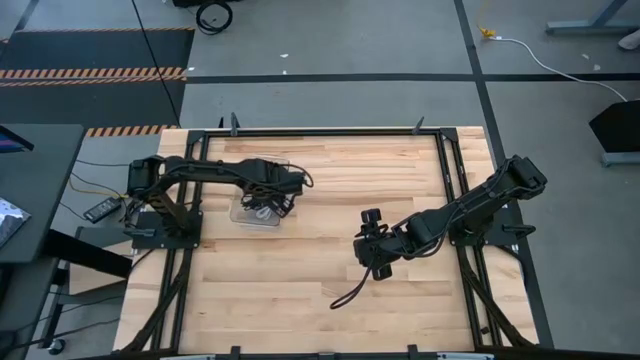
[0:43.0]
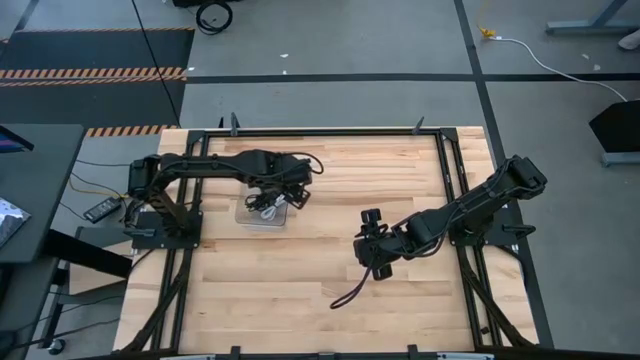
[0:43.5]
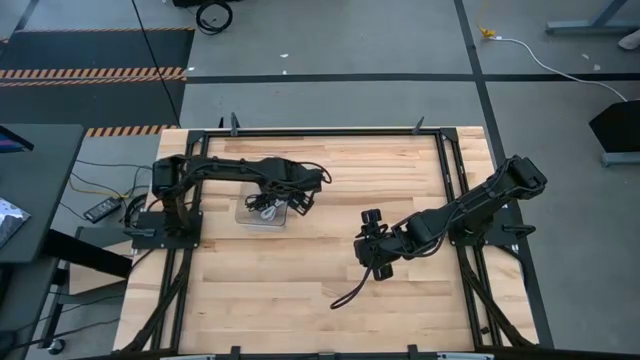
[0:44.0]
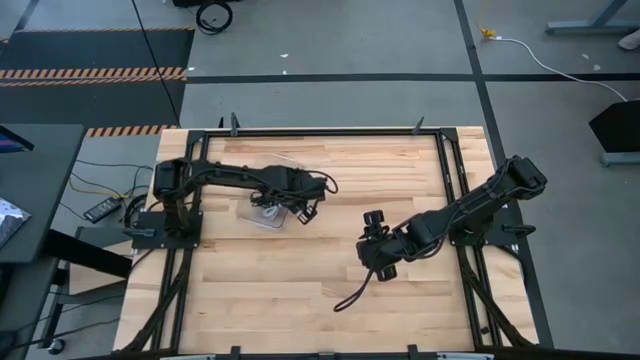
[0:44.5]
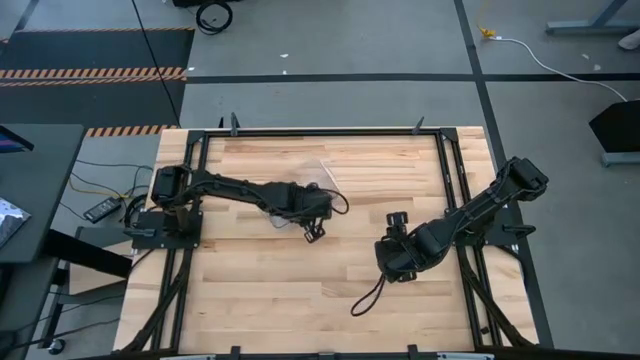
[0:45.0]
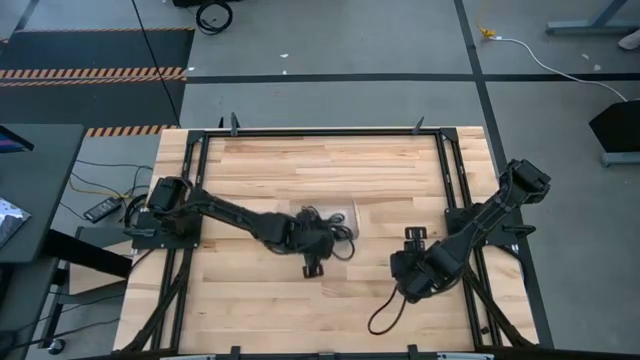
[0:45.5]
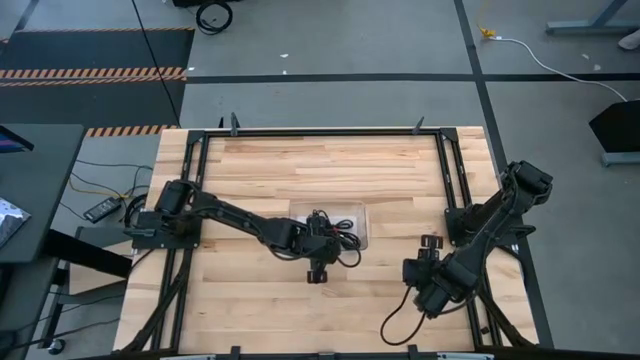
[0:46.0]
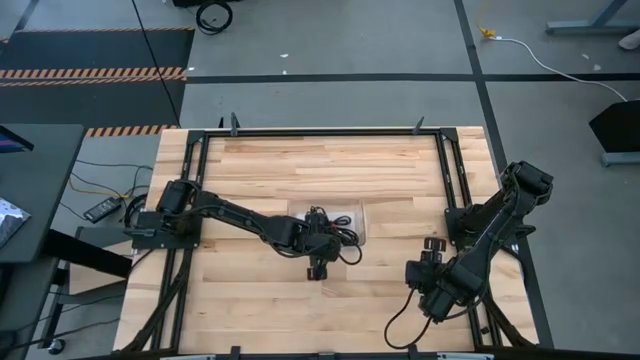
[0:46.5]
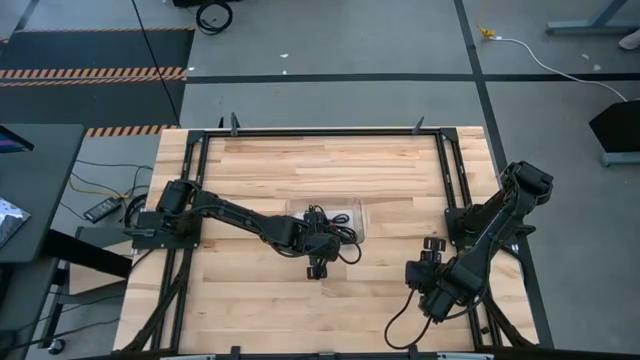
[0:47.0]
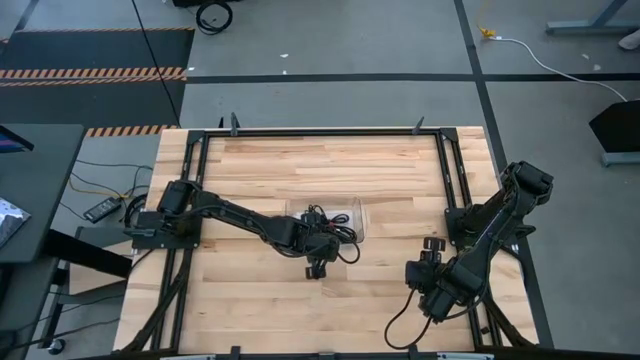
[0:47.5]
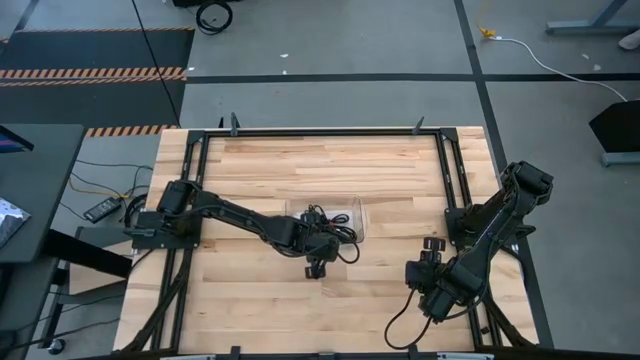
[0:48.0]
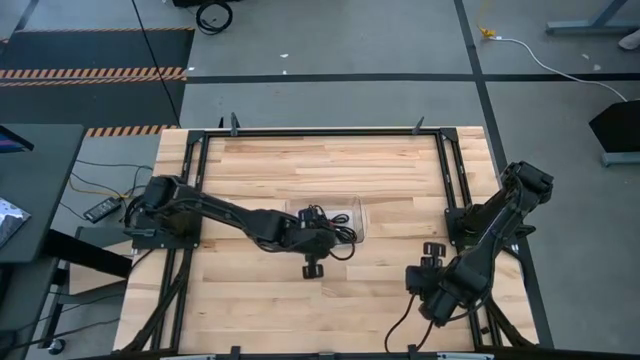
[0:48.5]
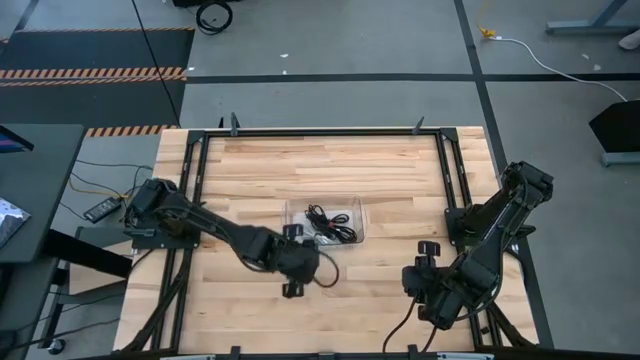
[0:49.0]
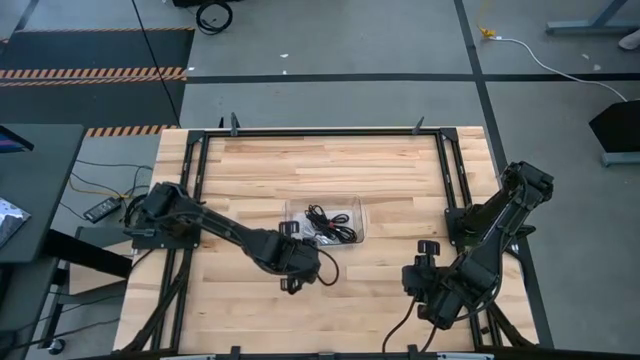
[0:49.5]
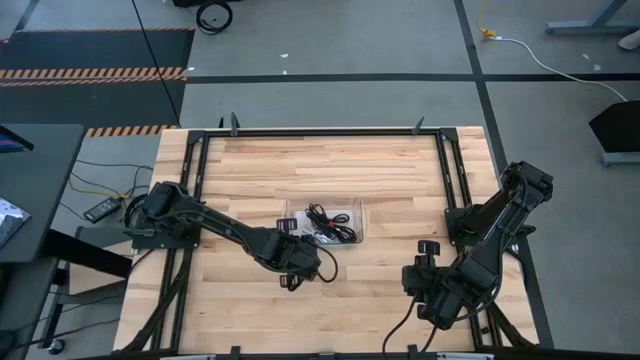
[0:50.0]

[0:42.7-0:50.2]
Task: Pick and place USB-C Cables
Move the transparent bin to the center of the table

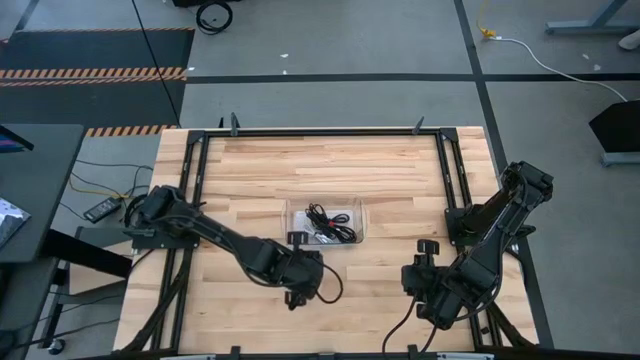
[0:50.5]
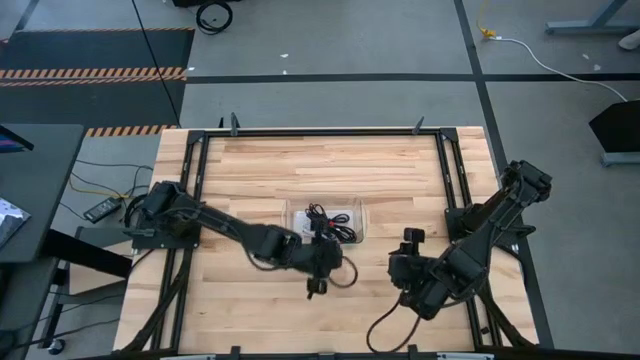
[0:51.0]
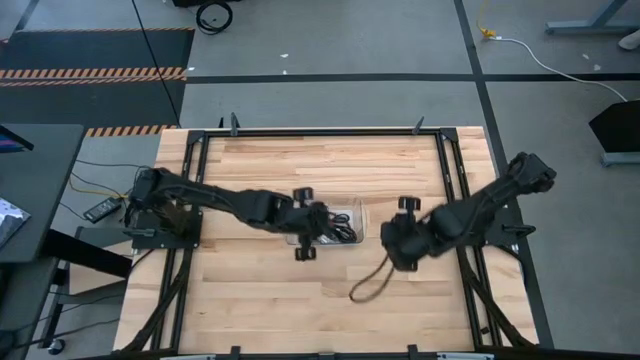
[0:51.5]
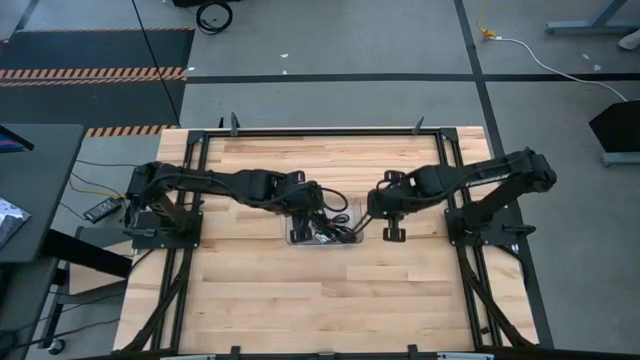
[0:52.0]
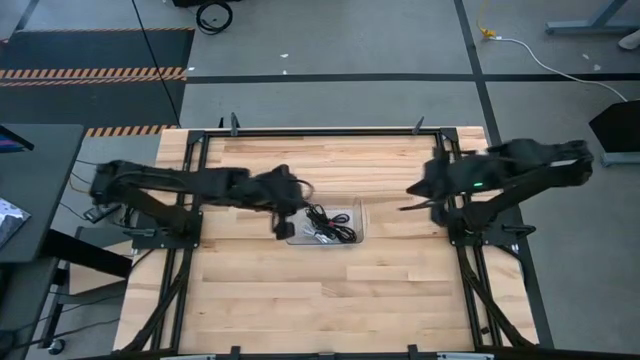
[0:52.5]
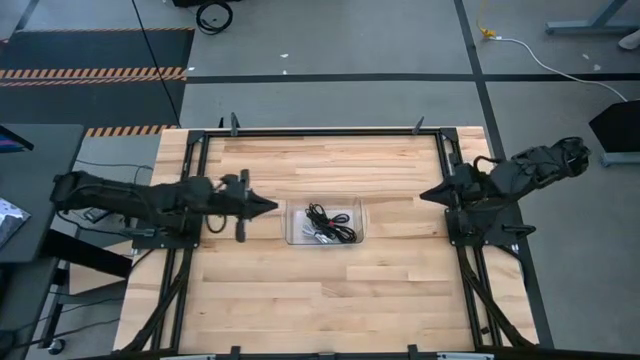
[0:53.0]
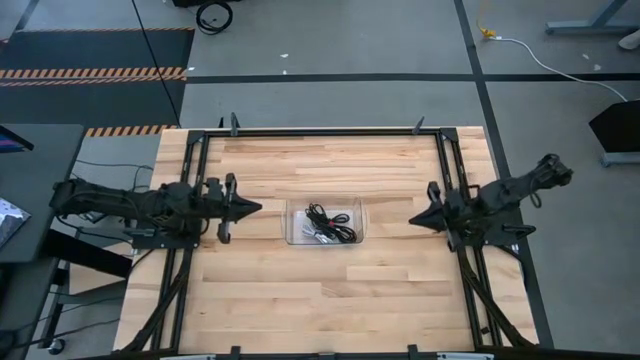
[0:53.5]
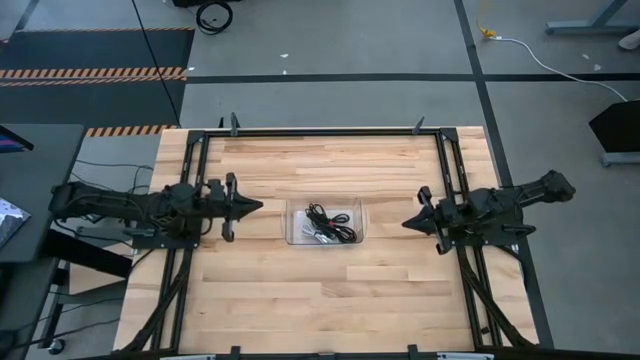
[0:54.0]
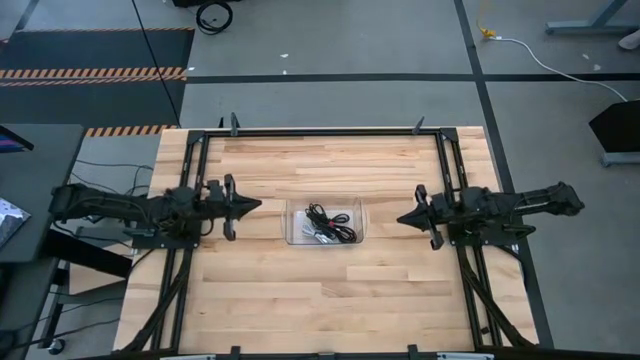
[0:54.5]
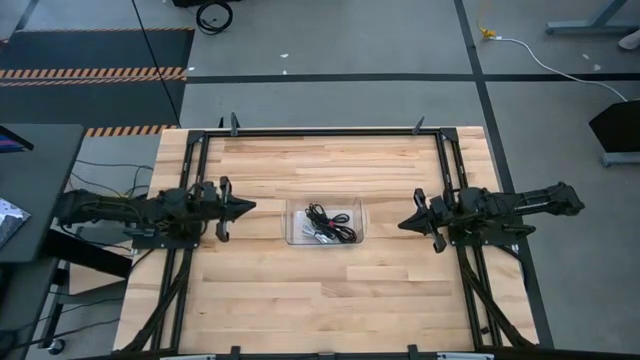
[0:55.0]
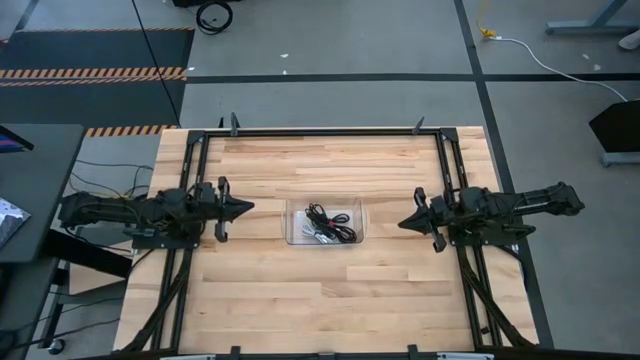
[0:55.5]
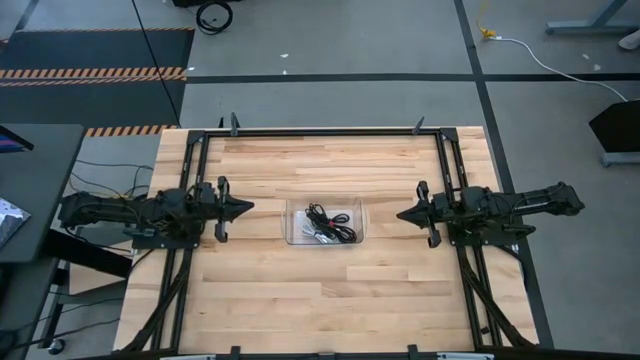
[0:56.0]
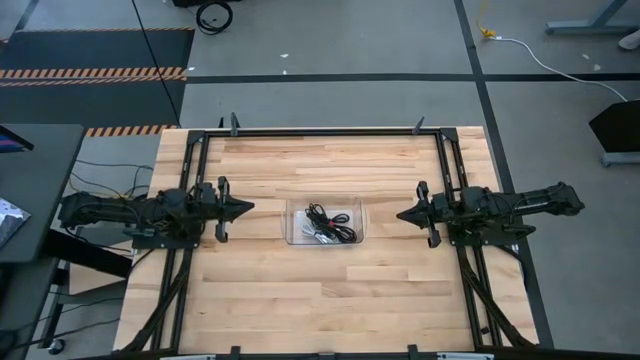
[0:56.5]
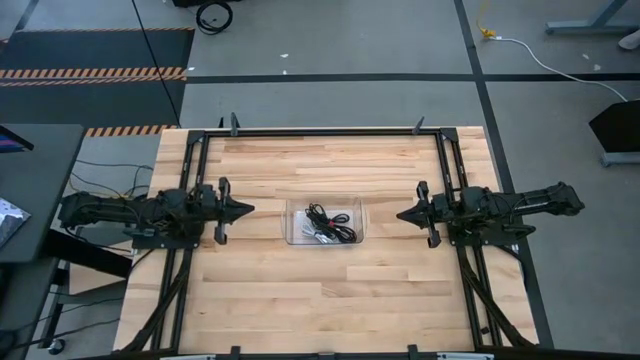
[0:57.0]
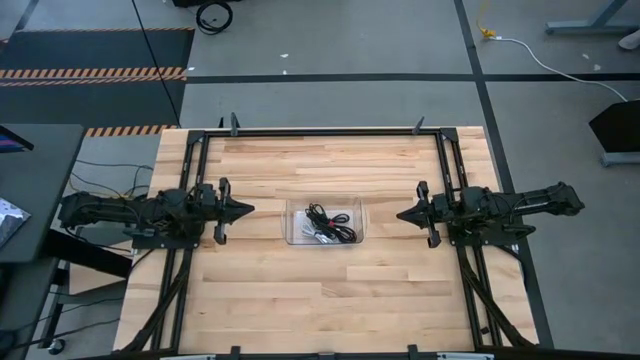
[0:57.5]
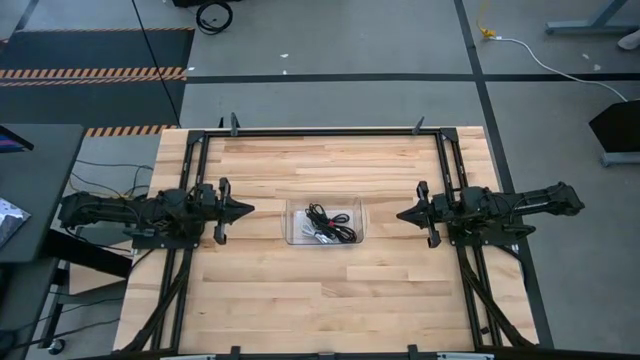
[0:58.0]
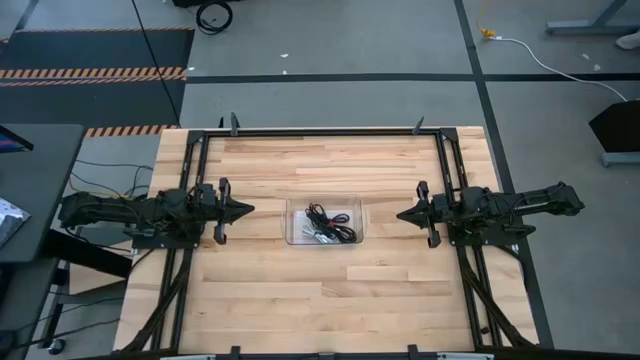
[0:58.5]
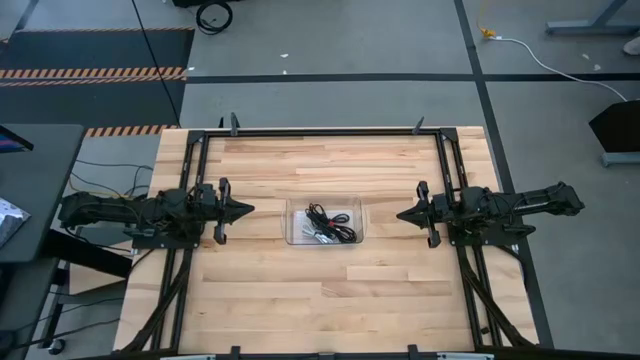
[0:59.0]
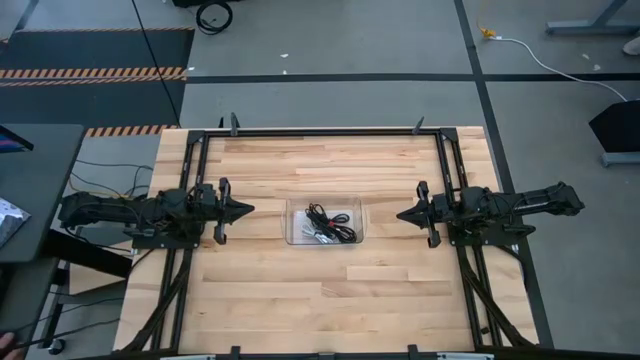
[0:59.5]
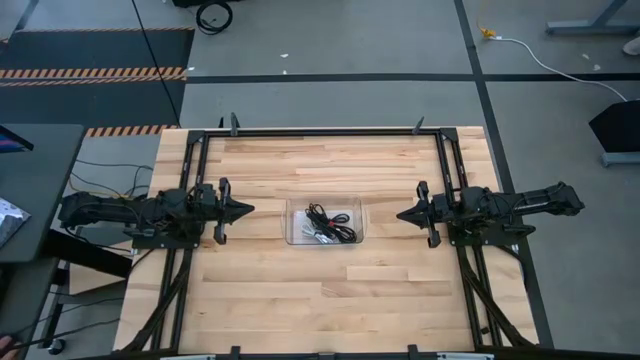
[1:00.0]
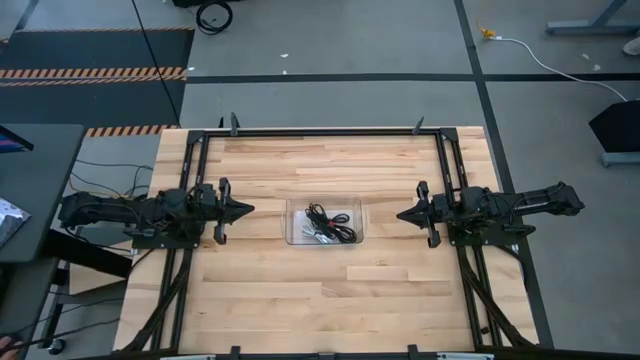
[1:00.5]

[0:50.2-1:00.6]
Return to Home Position

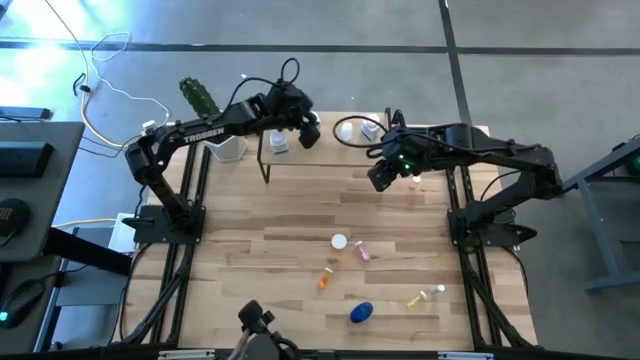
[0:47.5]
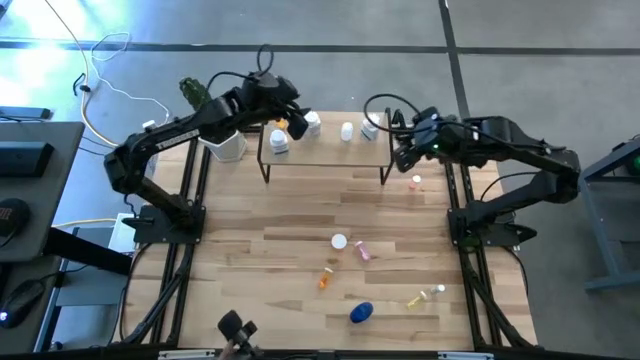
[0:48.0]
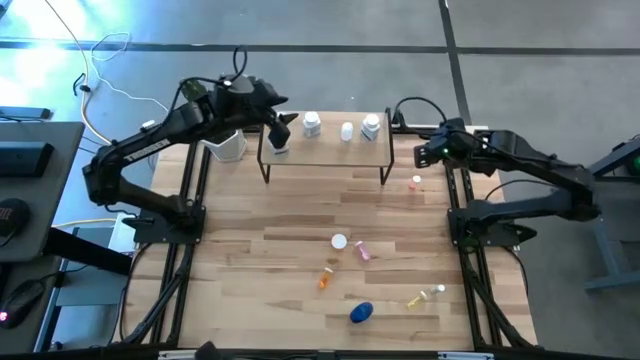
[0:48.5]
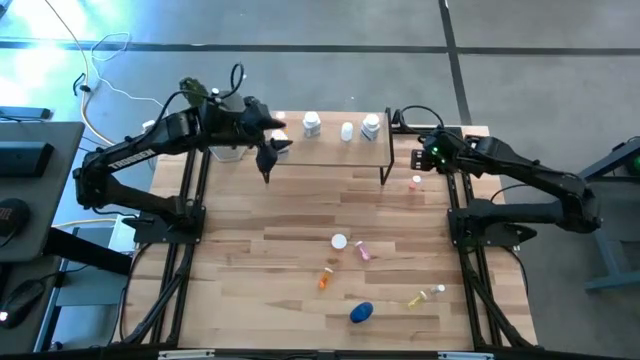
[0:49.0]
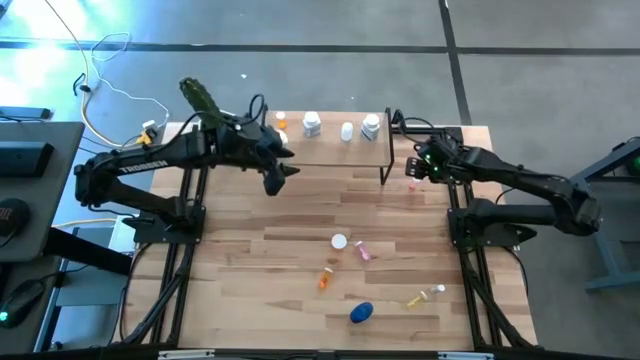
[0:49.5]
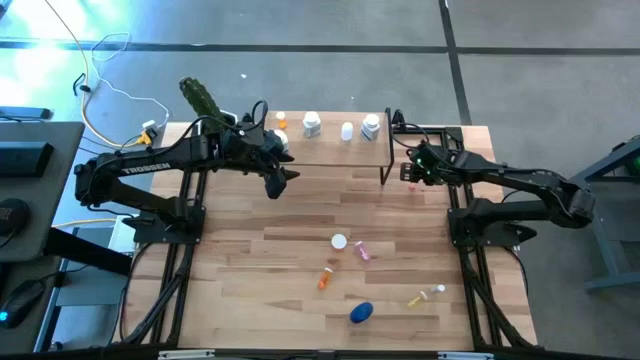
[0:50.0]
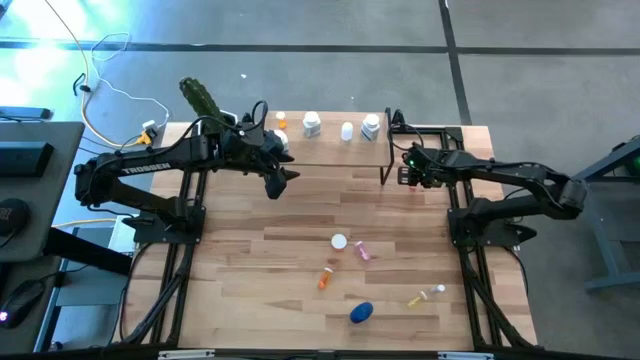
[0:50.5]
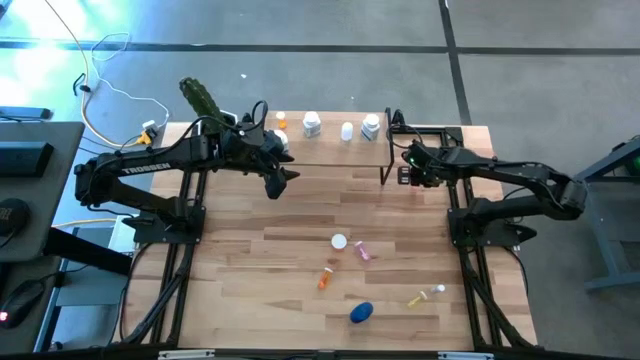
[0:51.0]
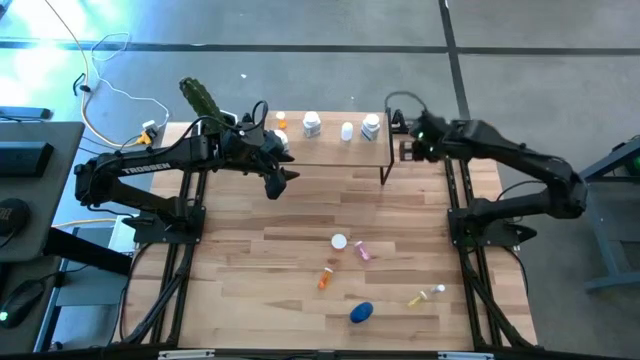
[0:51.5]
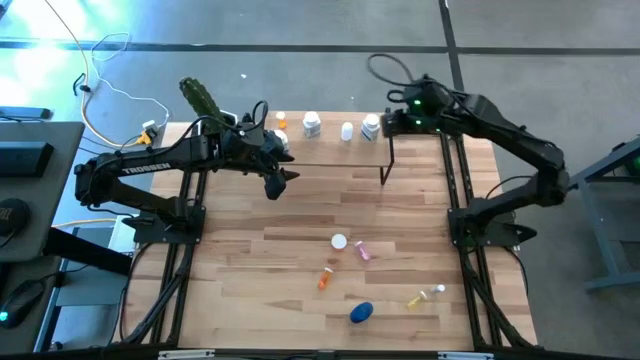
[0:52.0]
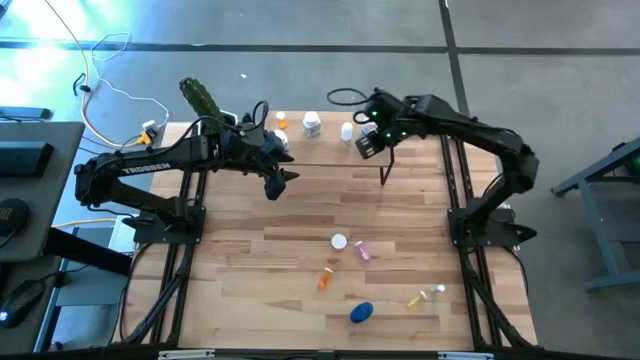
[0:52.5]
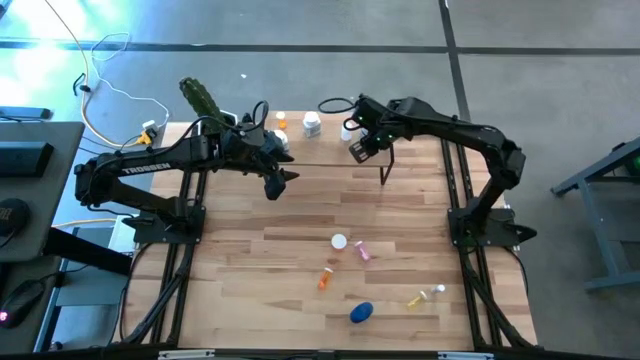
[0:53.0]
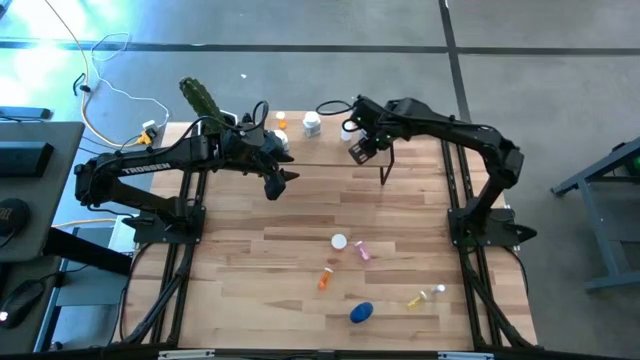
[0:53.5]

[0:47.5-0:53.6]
Task: Pick and place medicine bottles onto shelf by color
Put the top pink pill bottle on the shelf
